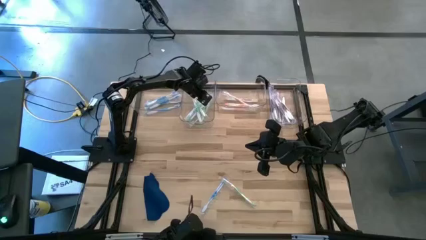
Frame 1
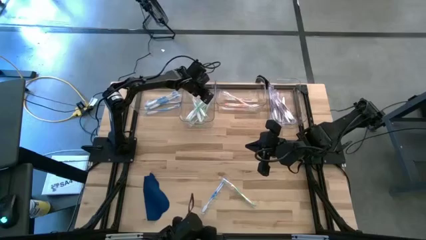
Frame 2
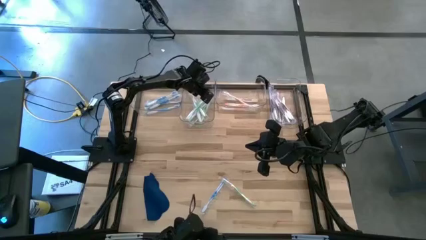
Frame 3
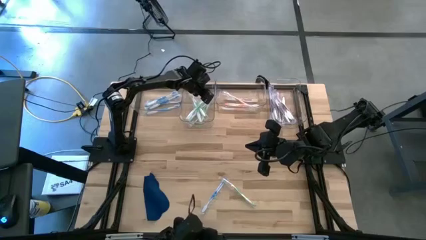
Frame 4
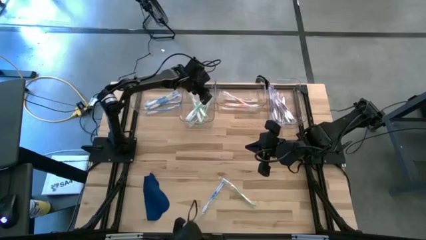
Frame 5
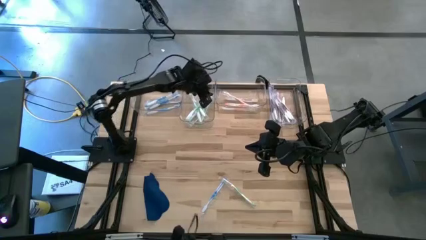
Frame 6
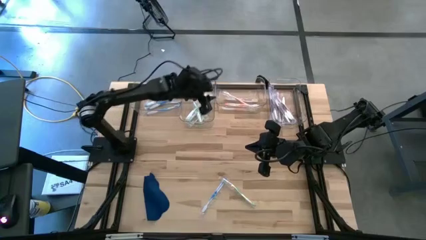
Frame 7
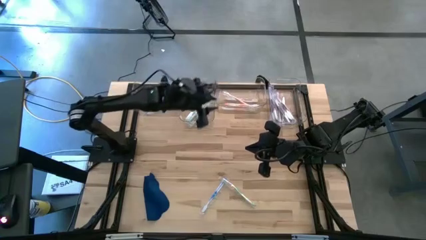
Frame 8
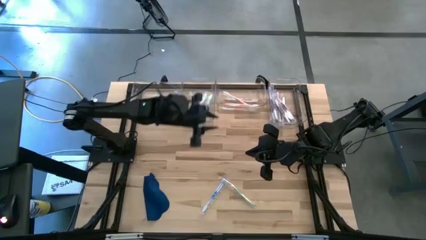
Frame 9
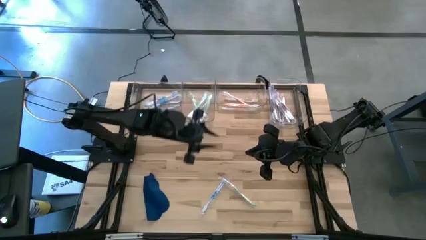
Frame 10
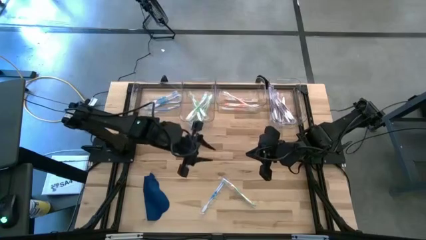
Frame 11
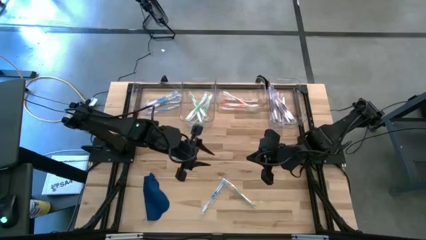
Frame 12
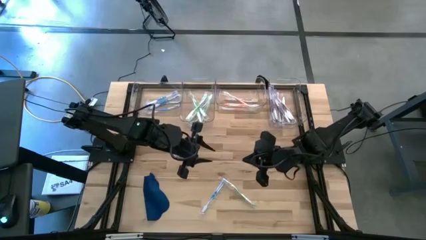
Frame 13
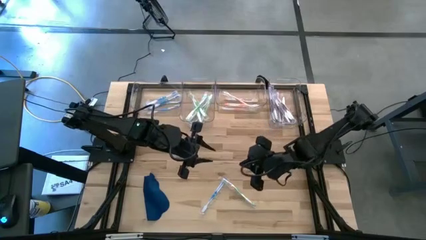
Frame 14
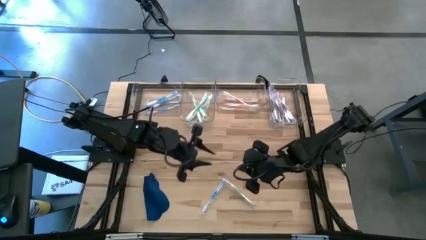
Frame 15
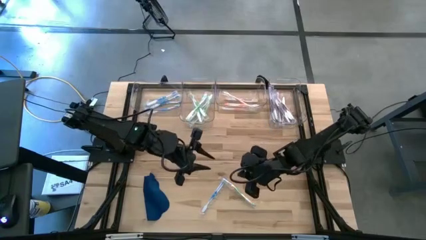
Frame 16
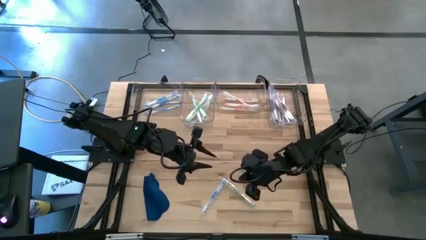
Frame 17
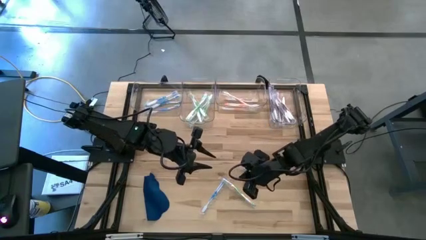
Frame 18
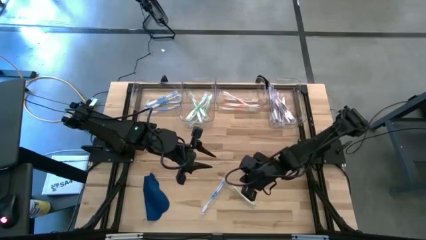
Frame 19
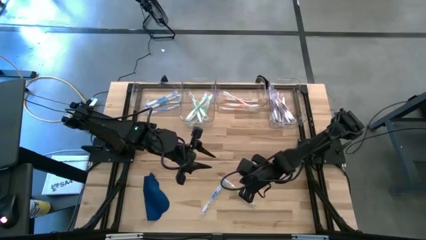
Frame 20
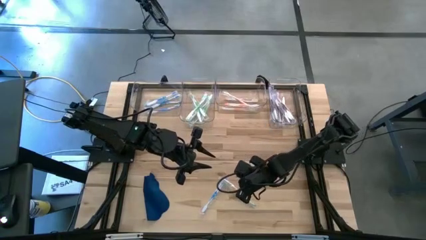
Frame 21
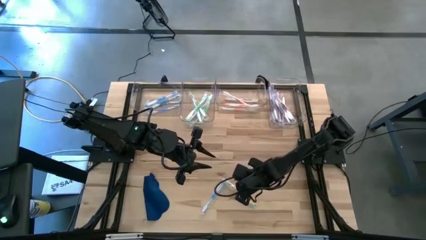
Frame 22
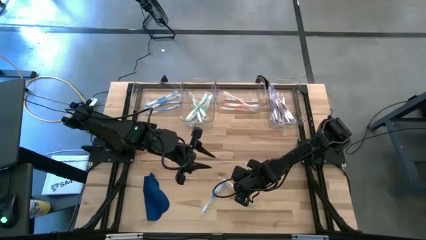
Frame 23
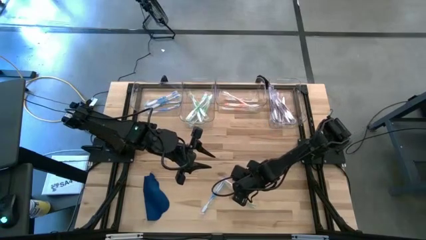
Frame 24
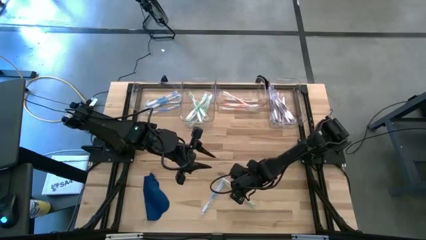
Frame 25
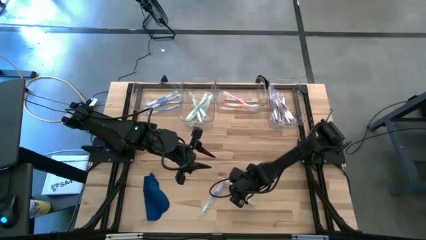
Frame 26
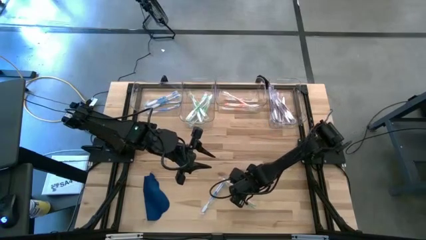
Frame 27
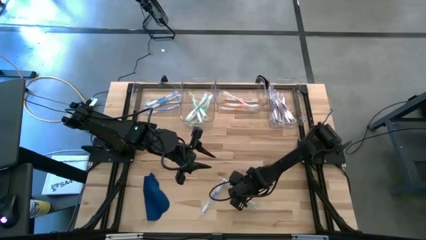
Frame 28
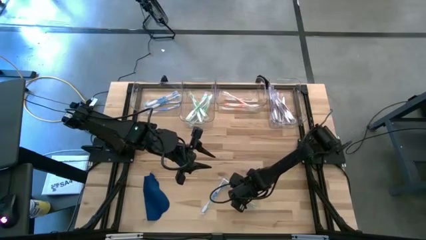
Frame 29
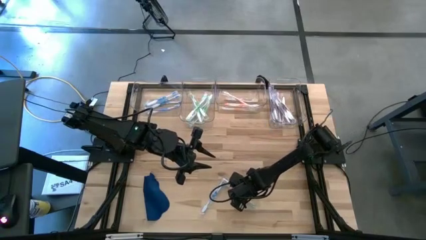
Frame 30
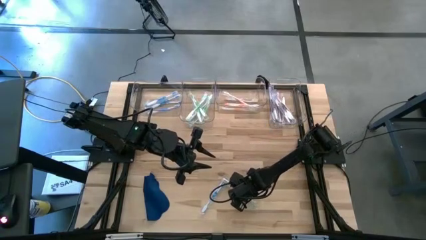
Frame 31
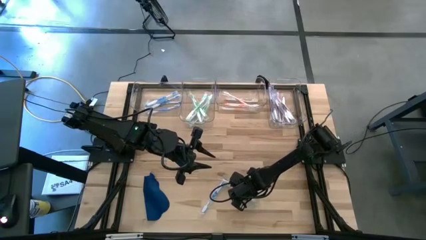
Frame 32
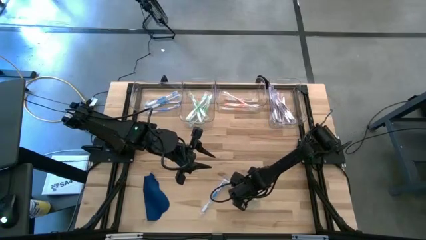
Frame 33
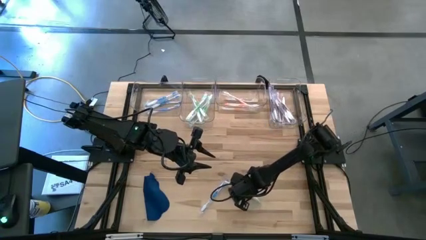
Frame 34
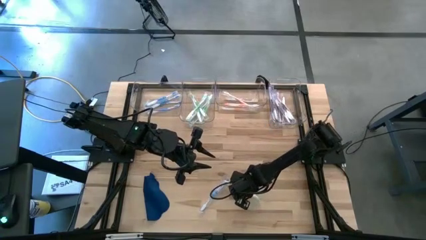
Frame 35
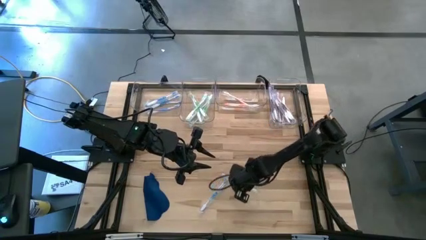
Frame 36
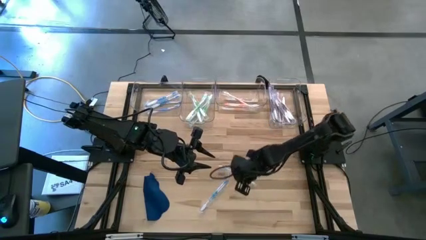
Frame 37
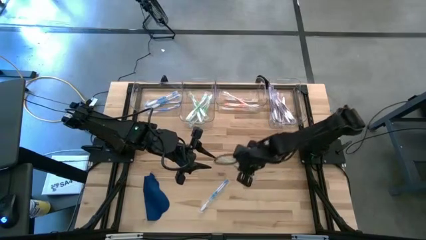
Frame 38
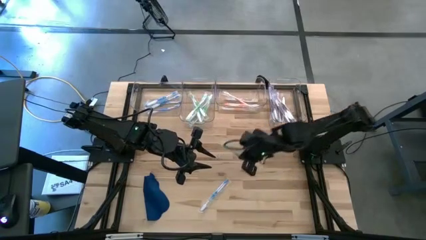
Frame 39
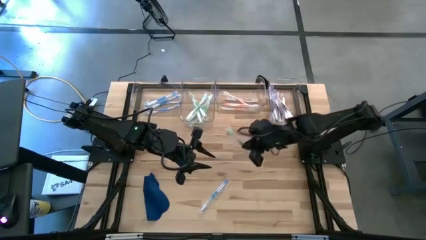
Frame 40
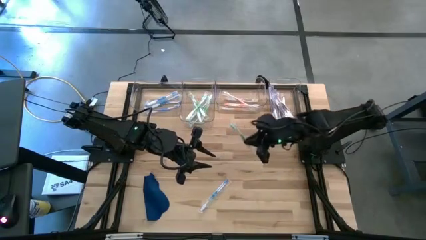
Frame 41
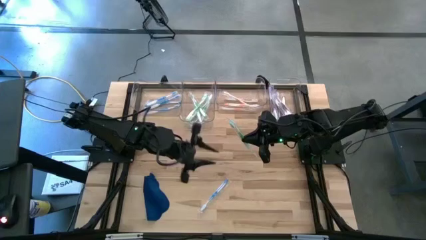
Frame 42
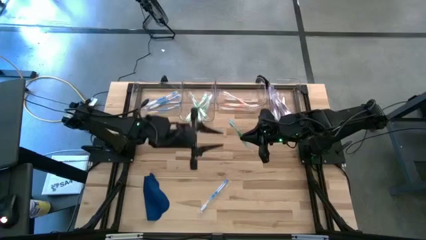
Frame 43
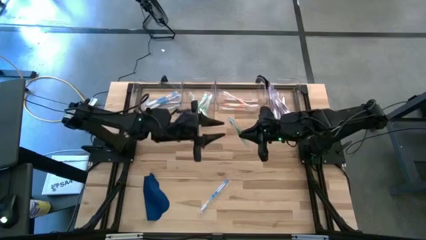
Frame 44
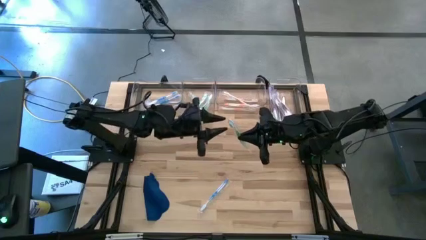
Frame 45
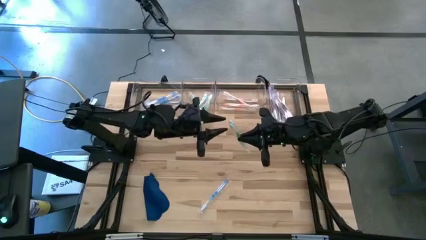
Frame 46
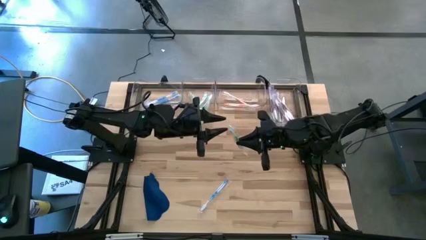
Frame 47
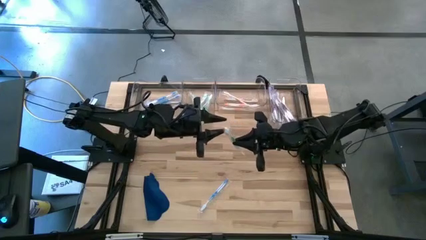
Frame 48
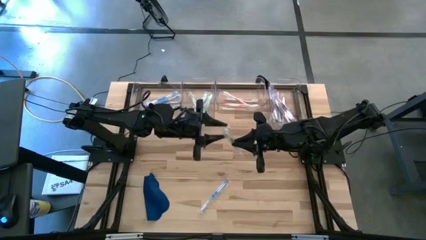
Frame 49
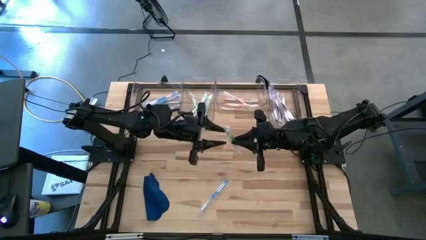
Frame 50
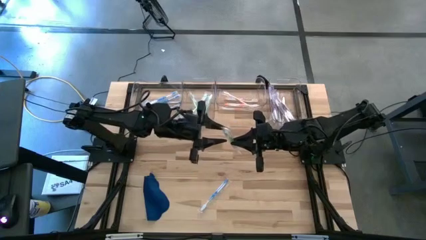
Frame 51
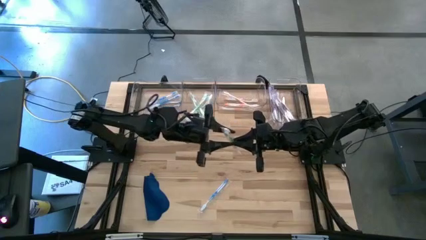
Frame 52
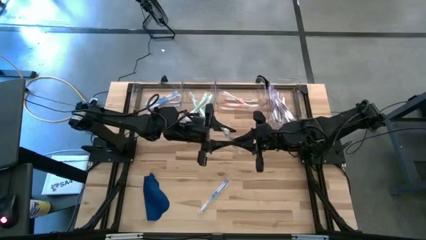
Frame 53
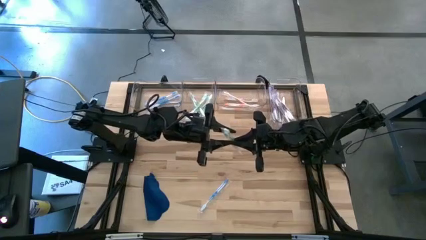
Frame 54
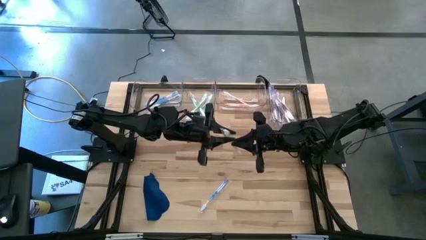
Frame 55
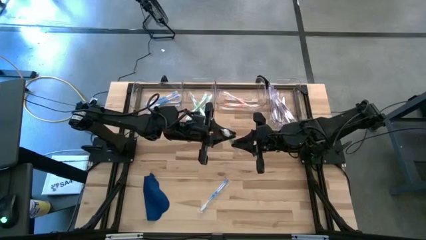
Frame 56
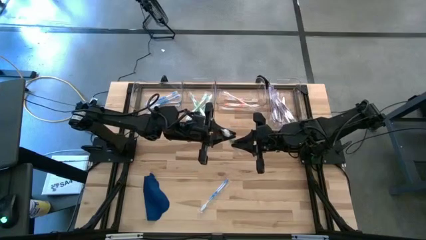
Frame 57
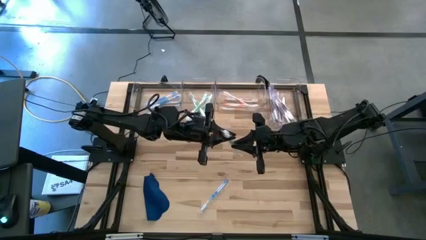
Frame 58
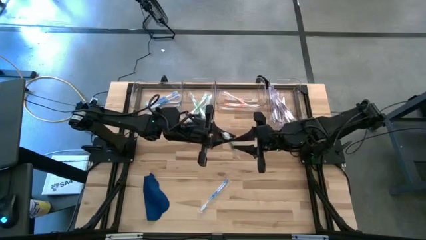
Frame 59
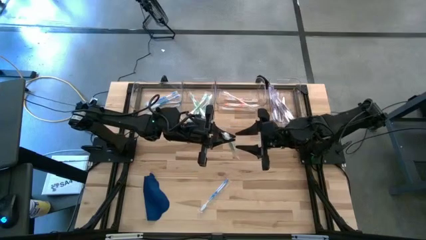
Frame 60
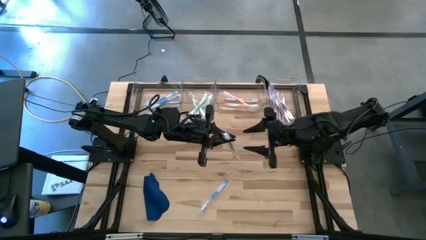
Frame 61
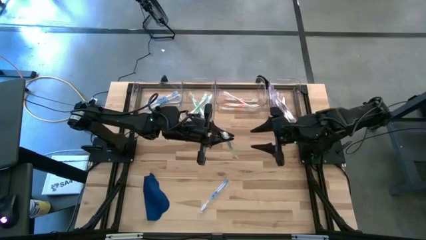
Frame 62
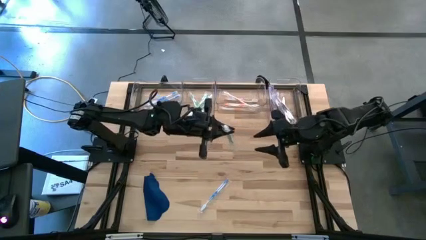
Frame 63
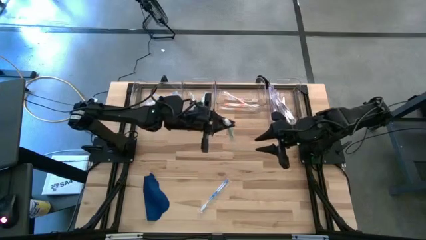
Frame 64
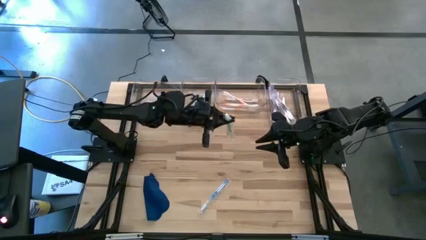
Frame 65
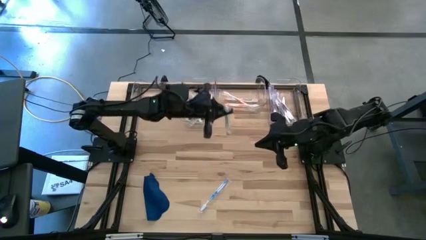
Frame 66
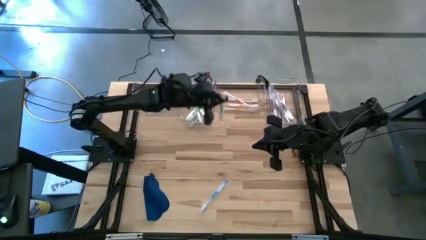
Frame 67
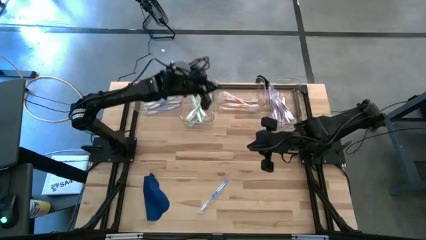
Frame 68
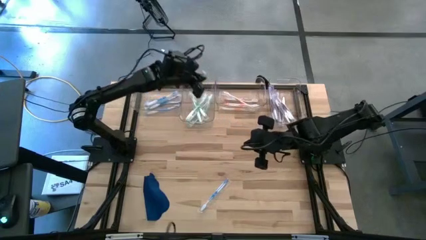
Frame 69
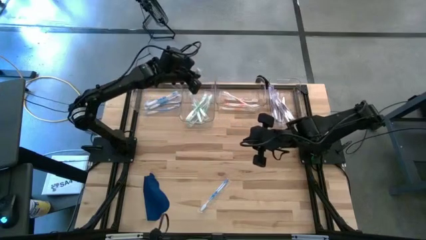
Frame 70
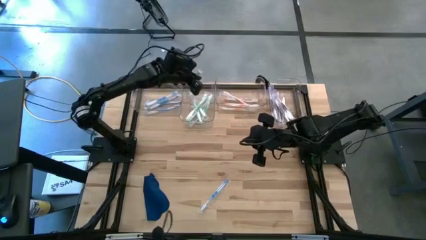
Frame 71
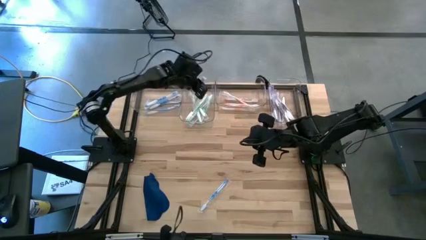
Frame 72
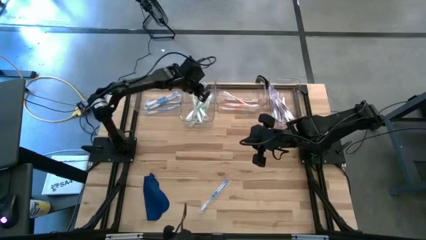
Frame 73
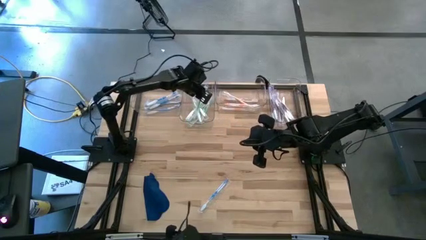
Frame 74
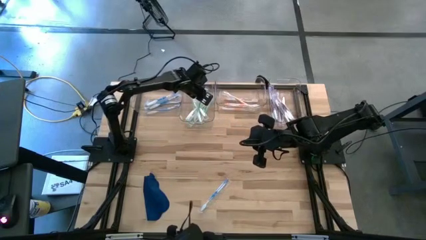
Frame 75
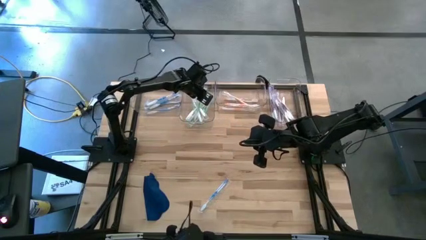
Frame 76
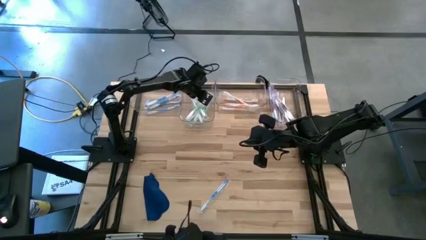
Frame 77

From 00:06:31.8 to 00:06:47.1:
Task: Pick & Place Toothbrushes
Put the green toothbrush into the middle left transparent bin
